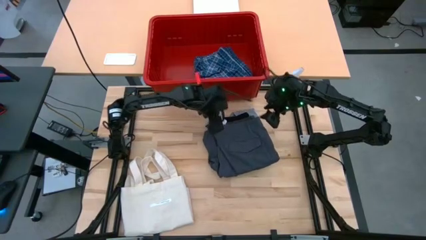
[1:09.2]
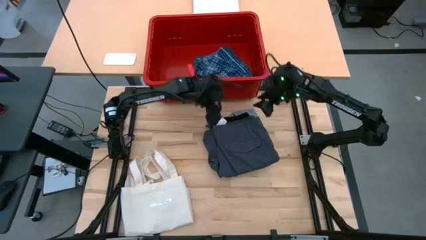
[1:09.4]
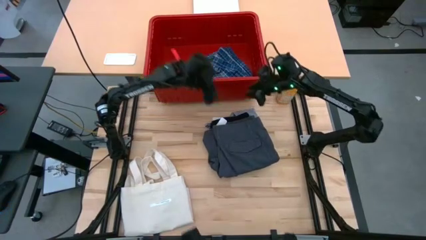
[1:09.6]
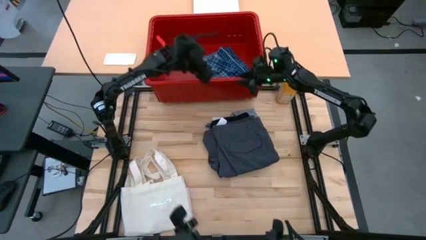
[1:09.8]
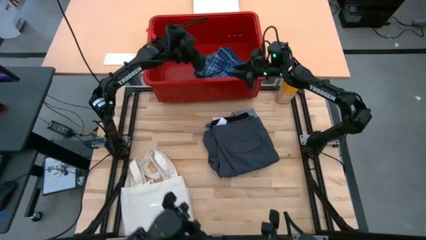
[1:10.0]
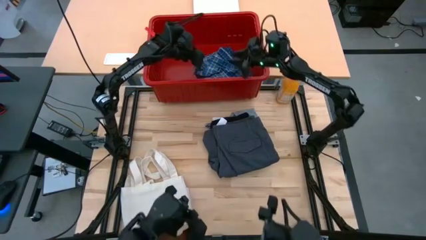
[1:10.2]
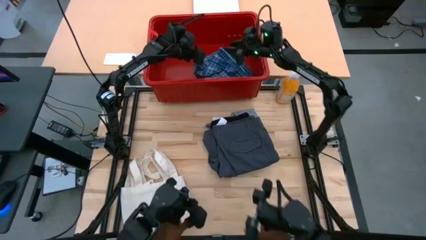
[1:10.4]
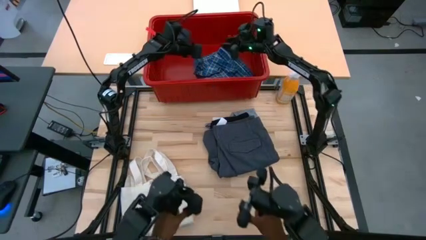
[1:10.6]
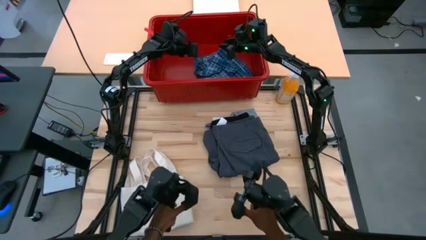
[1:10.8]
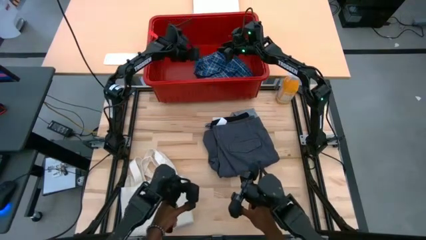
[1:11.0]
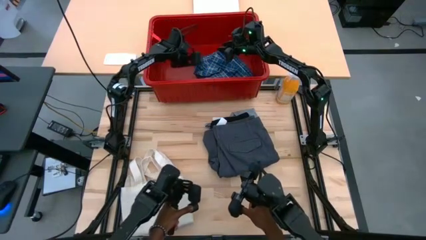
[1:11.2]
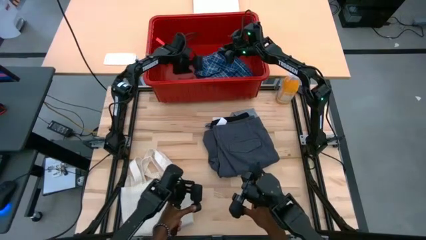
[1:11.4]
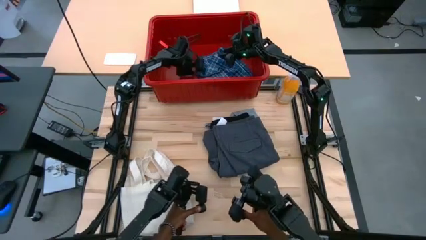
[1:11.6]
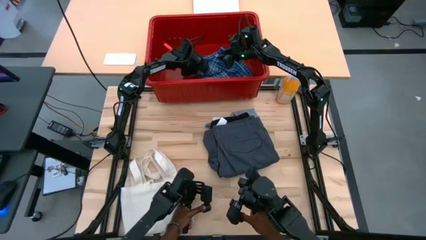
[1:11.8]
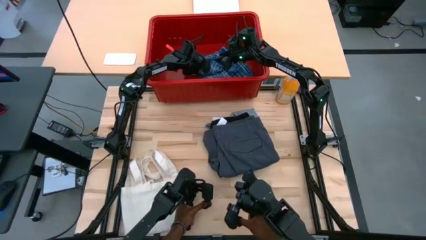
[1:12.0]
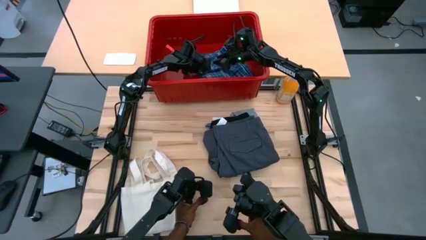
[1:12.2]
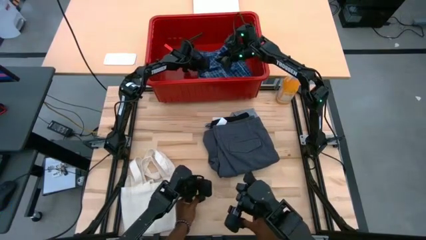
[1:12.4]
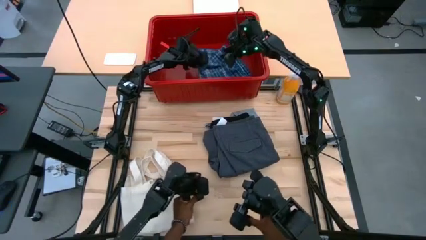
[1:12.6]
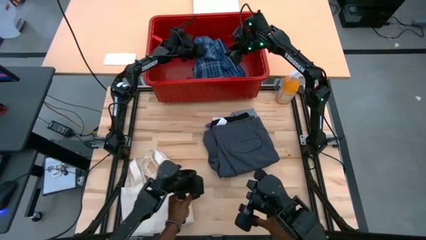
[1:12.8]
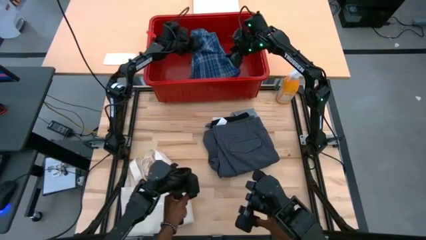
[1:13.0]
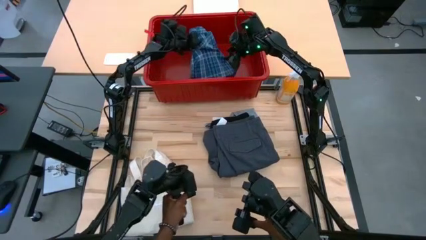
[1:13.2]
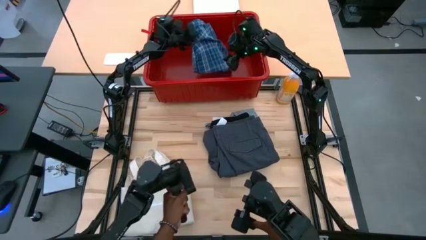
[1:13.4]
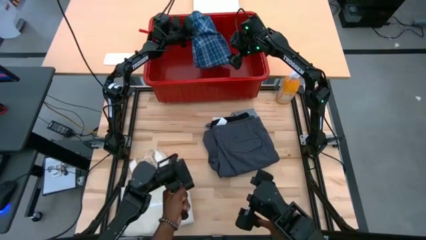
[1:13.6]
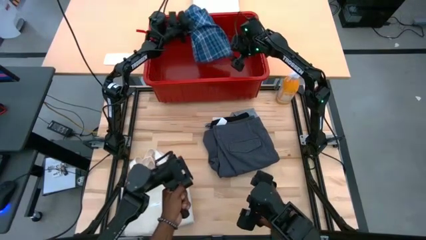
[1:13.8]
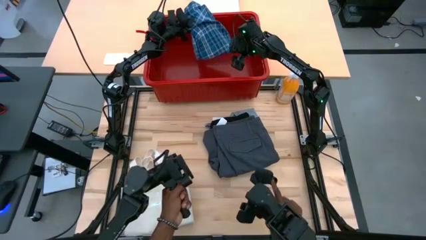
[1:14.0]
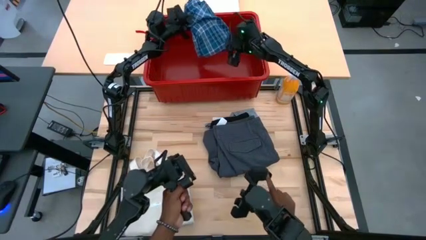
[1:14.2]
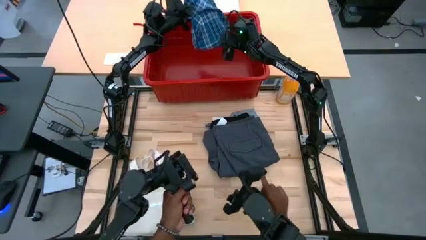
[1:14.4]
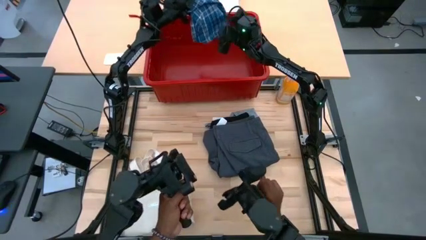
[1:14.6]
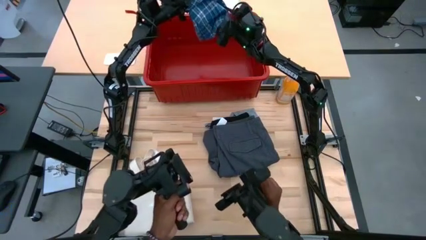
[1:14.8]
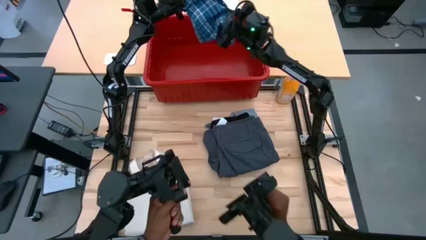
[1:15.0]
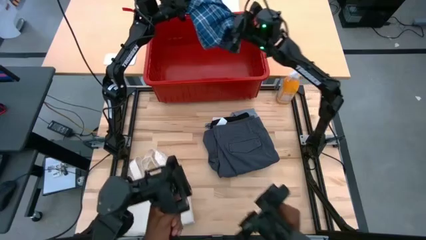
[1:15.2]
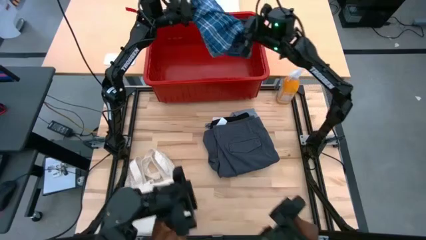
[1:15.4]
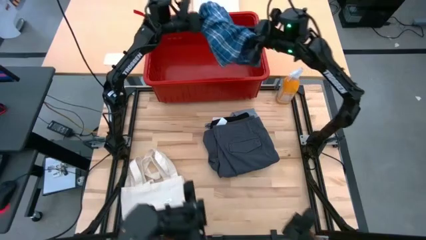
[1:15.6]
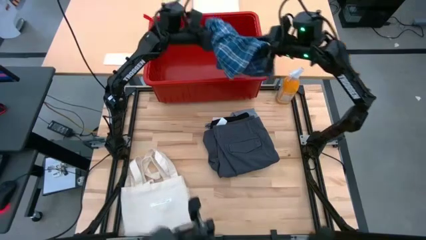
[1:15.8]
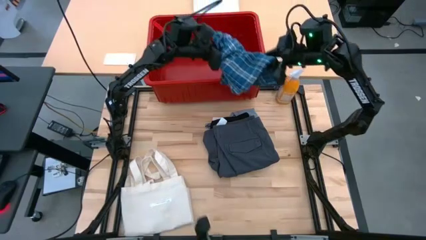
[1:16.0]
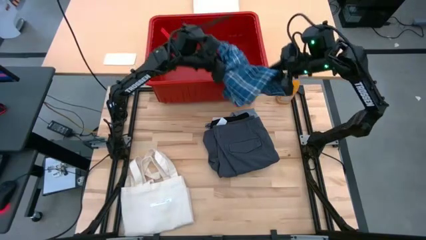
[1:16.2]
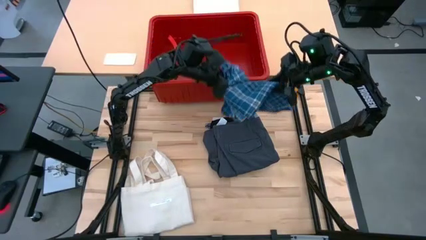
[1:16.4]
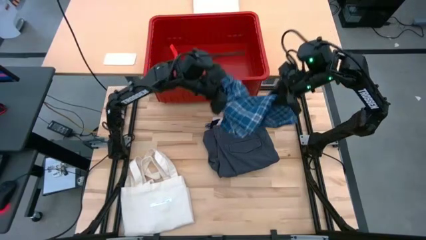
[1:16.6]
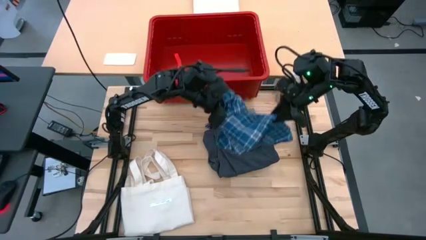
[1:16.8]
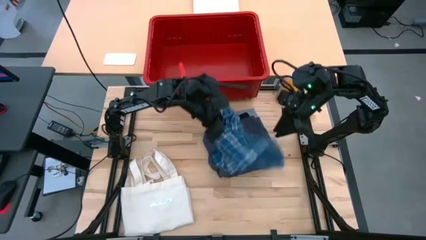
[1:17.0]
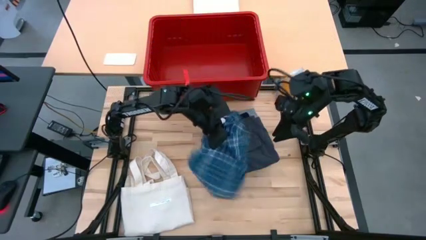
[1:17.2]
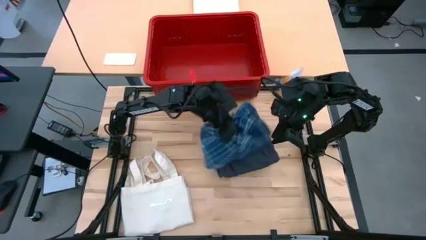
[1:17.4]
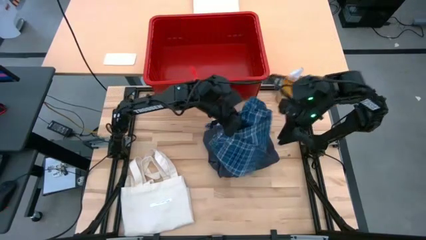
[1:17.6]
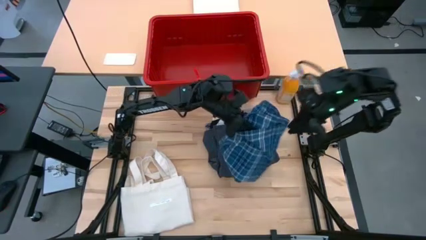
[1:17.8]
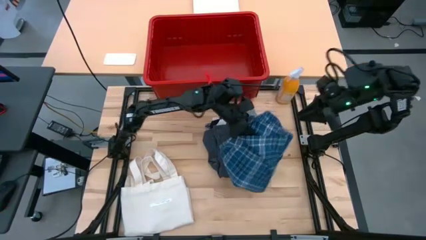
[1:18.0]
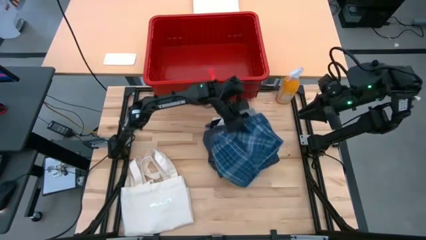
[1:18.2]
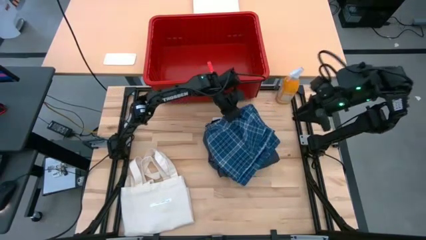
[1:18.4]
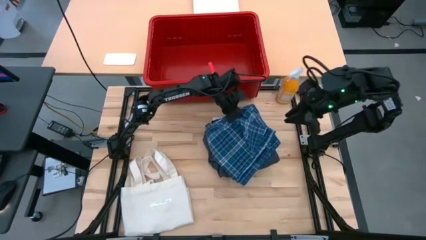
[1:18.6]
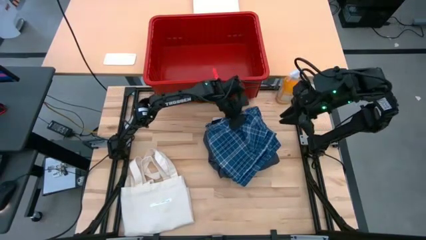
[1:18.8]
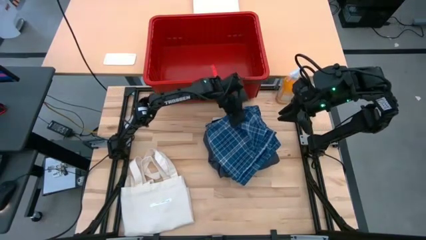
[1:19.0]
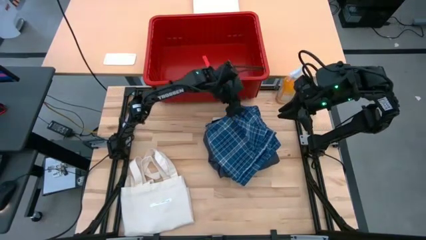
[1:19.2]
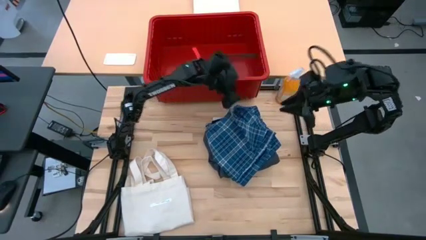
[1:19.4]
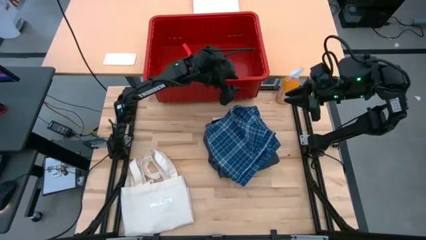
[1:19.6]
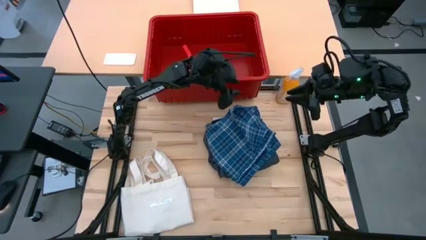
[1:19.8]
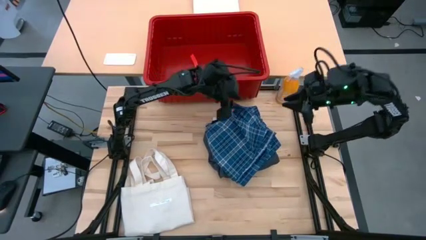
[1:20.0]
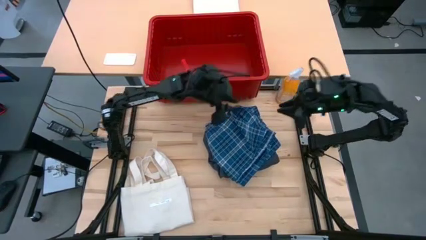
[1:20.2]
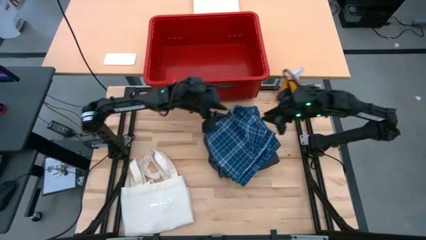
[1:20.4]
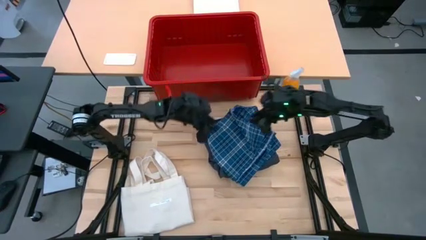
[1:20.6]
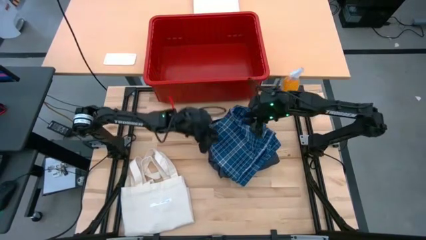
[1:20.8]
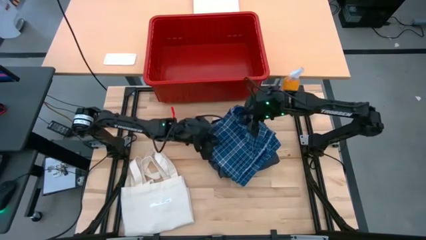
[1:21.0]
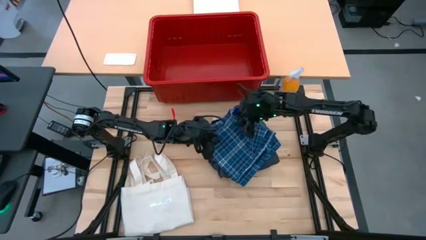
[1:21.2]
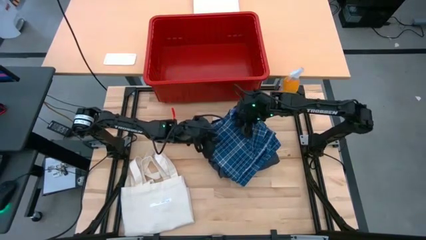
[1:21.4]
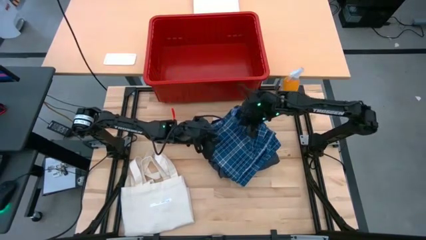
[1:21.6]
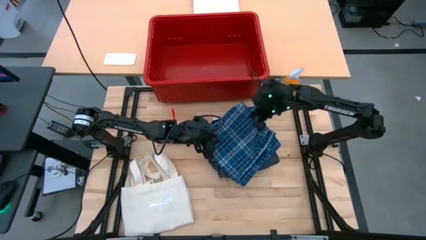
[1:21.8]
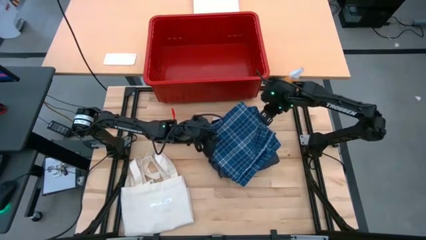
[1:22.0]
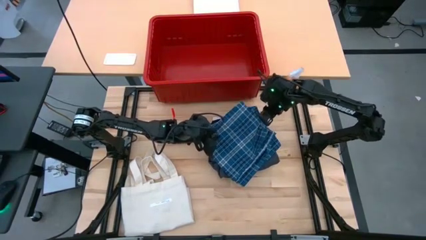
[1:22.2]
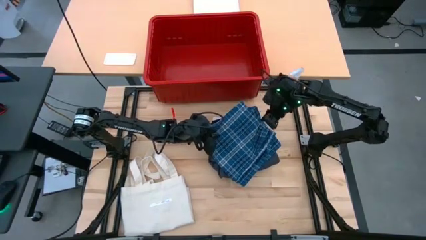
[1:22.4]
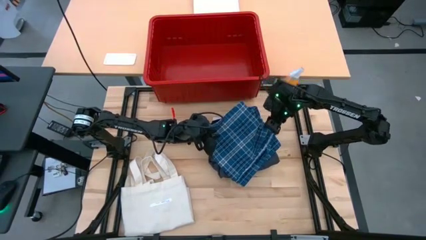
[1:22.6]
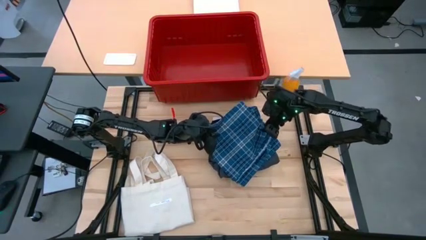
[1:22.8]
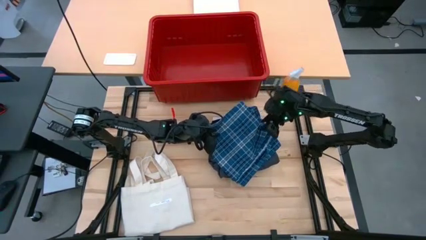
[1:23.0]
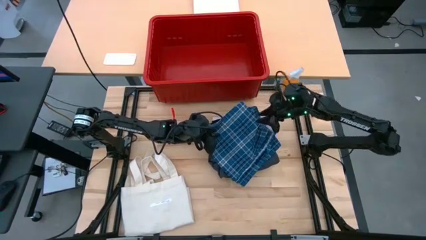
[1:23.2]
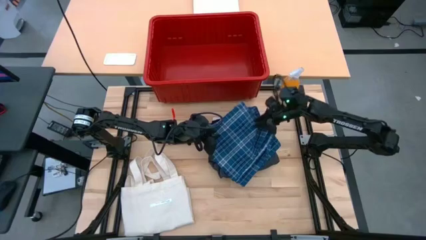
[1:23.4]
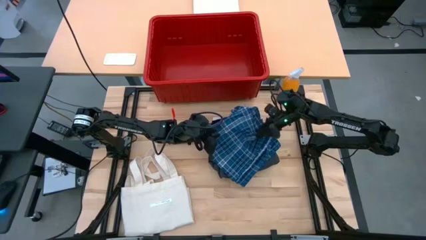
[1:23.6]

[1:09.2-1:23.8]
Task: Fold laundry
Remove the blue shorts from the red organizer bin
